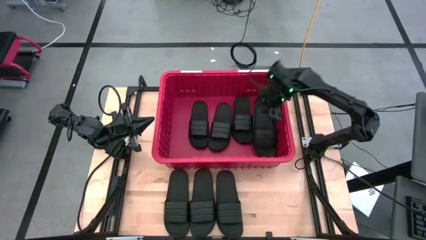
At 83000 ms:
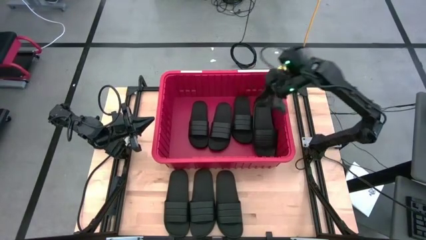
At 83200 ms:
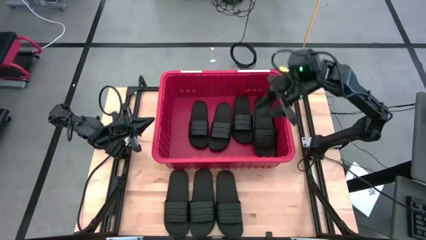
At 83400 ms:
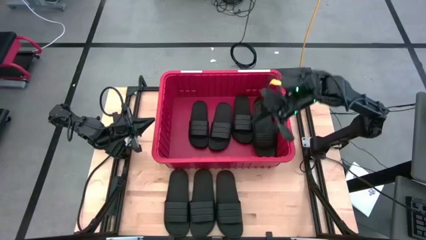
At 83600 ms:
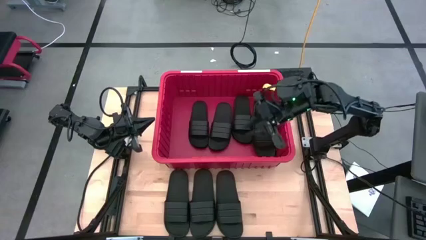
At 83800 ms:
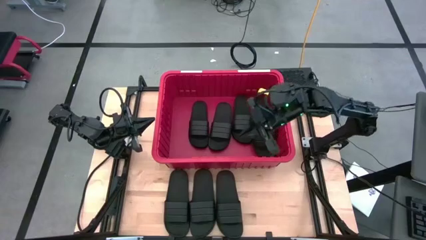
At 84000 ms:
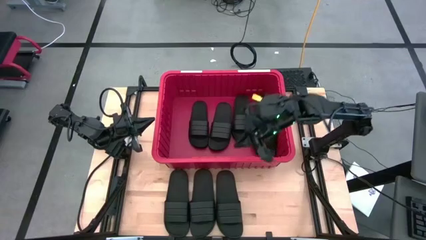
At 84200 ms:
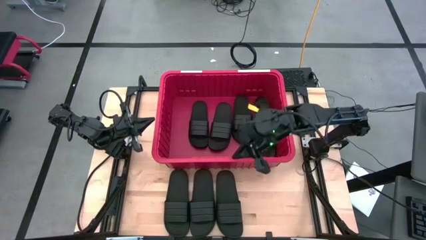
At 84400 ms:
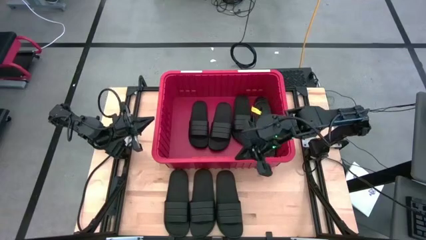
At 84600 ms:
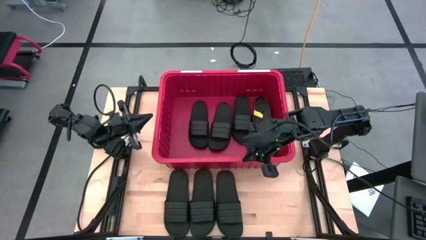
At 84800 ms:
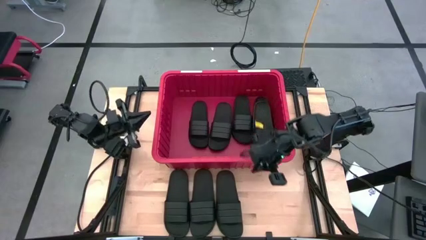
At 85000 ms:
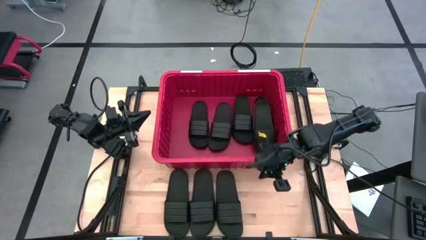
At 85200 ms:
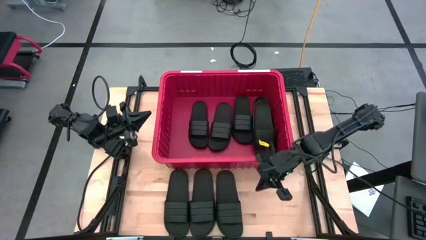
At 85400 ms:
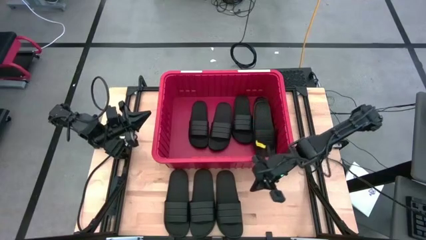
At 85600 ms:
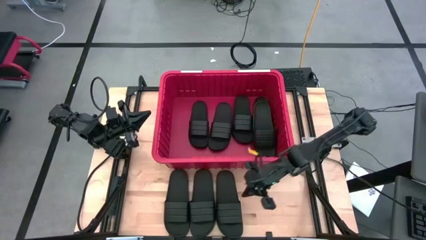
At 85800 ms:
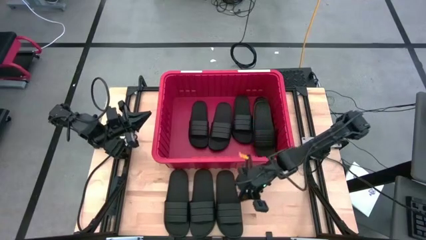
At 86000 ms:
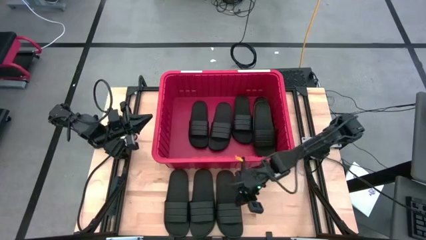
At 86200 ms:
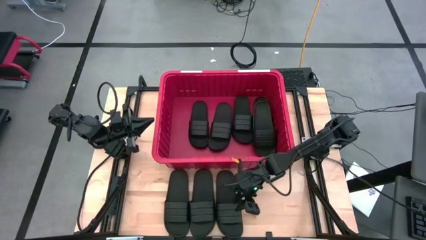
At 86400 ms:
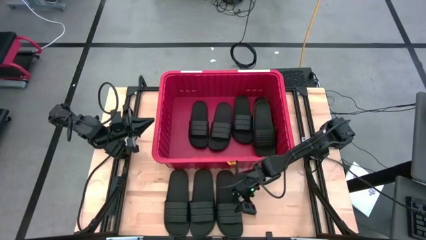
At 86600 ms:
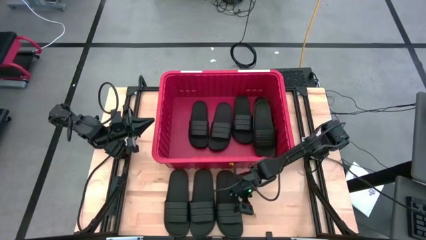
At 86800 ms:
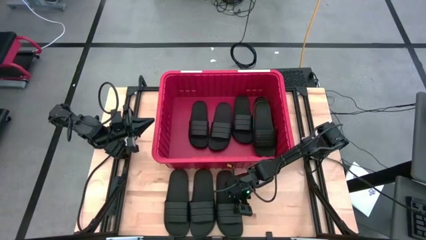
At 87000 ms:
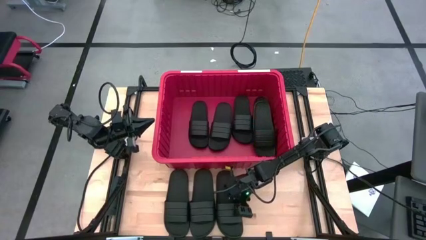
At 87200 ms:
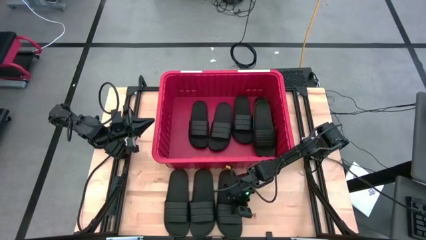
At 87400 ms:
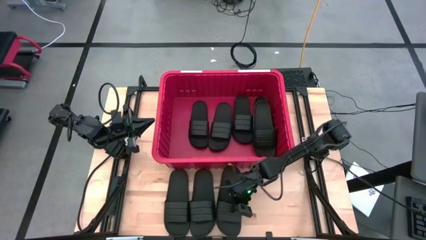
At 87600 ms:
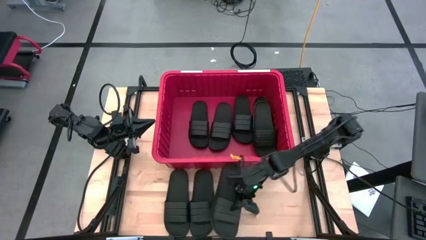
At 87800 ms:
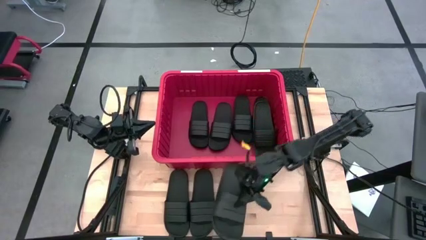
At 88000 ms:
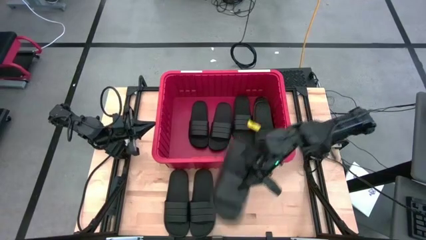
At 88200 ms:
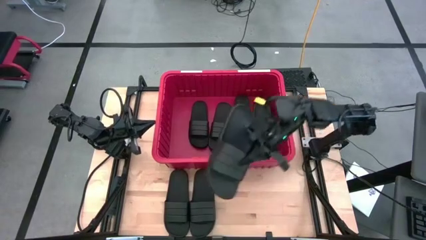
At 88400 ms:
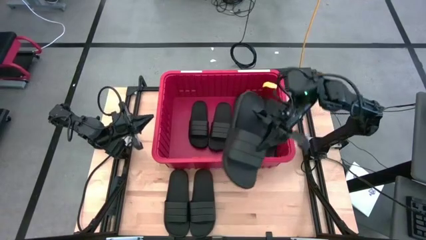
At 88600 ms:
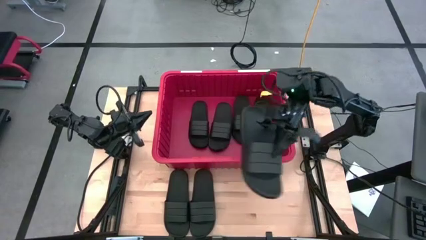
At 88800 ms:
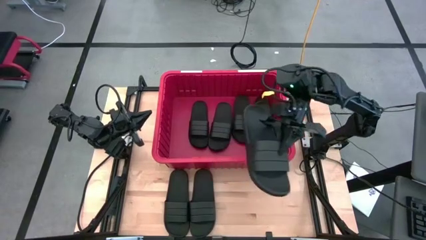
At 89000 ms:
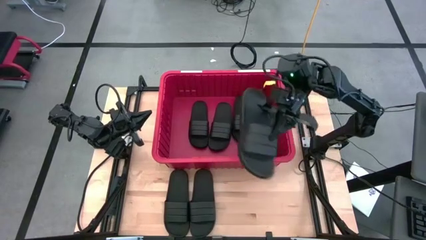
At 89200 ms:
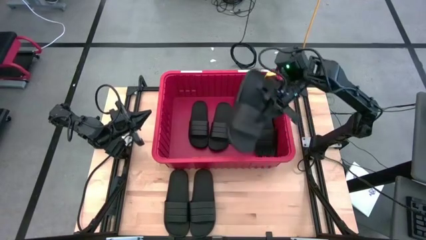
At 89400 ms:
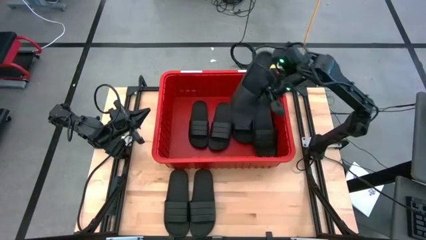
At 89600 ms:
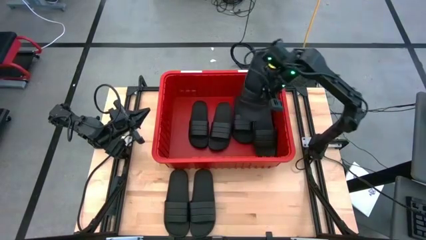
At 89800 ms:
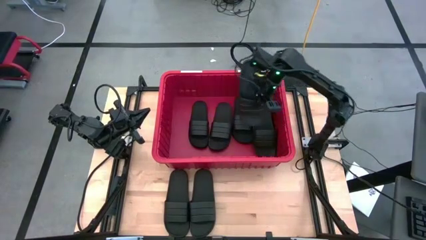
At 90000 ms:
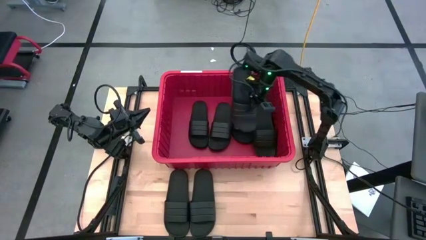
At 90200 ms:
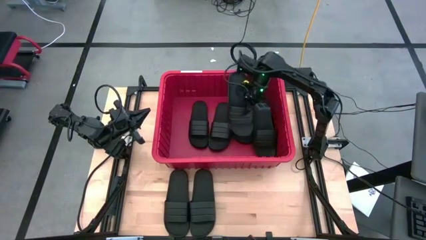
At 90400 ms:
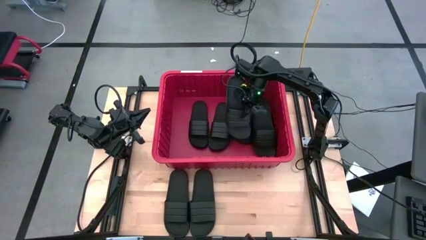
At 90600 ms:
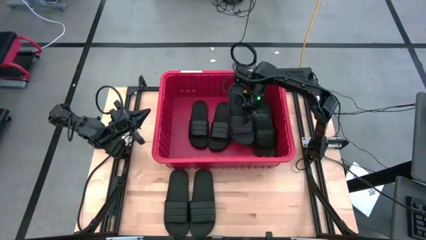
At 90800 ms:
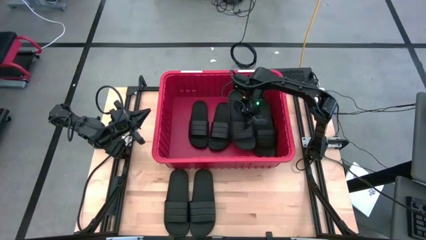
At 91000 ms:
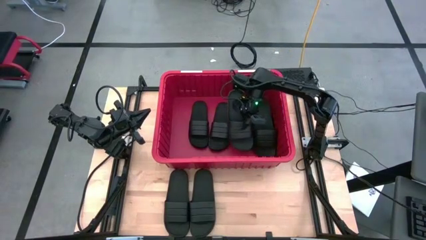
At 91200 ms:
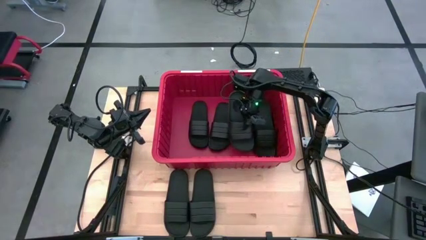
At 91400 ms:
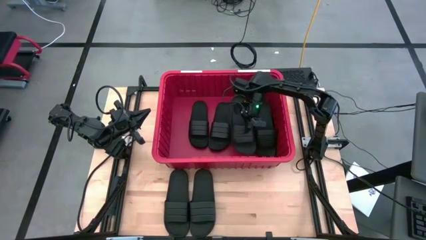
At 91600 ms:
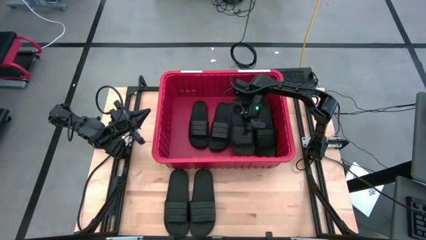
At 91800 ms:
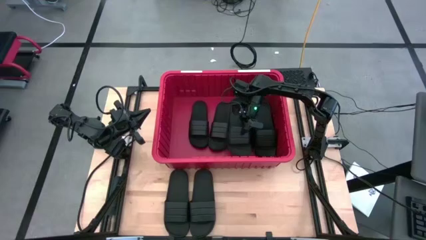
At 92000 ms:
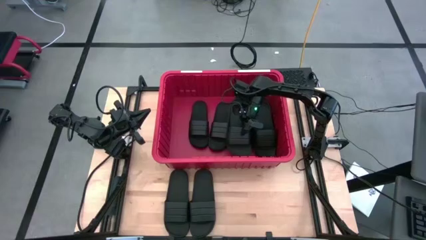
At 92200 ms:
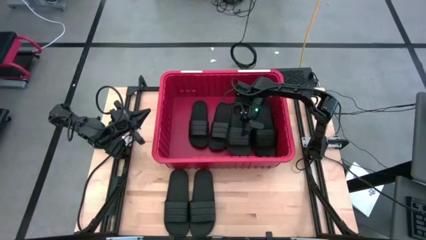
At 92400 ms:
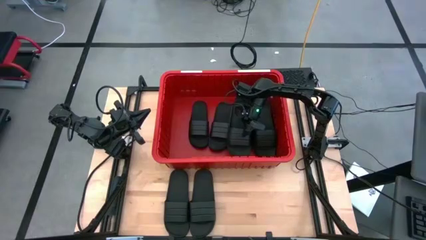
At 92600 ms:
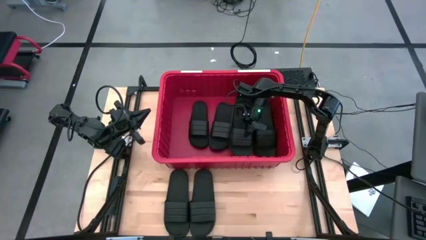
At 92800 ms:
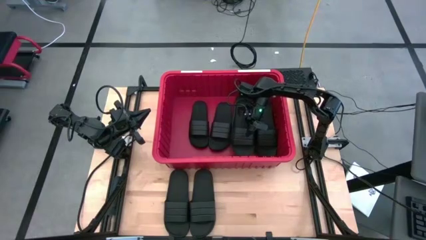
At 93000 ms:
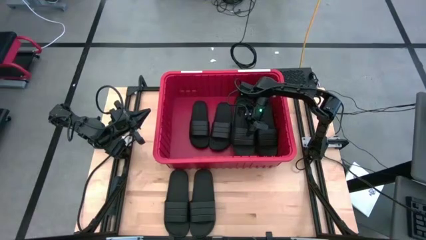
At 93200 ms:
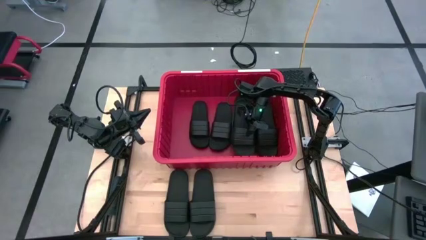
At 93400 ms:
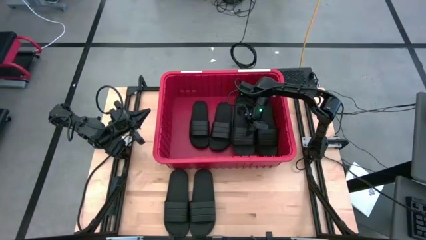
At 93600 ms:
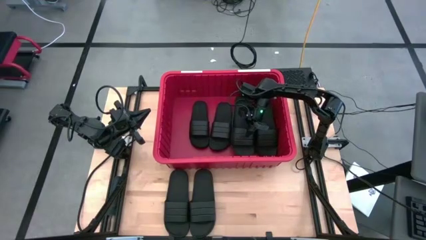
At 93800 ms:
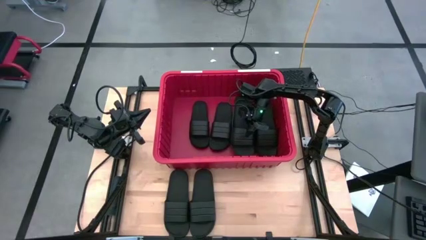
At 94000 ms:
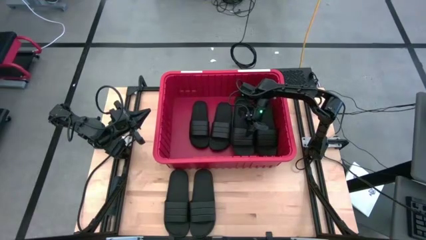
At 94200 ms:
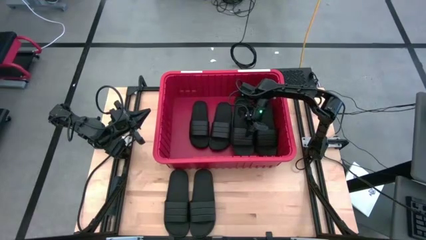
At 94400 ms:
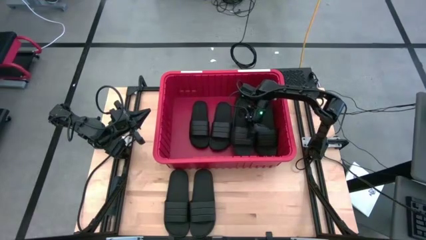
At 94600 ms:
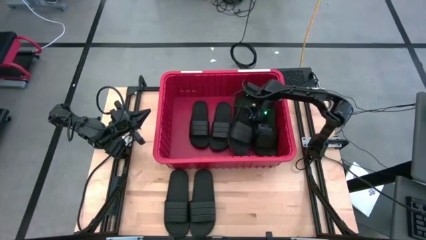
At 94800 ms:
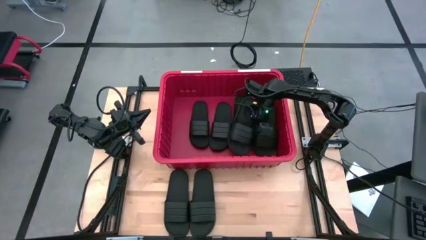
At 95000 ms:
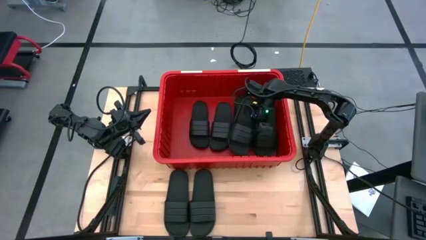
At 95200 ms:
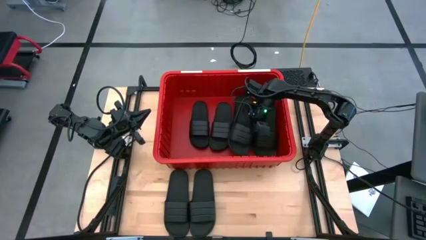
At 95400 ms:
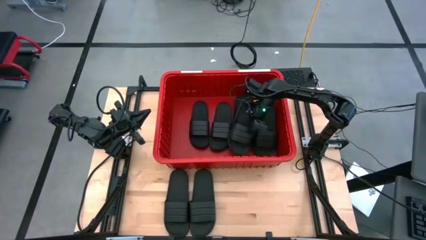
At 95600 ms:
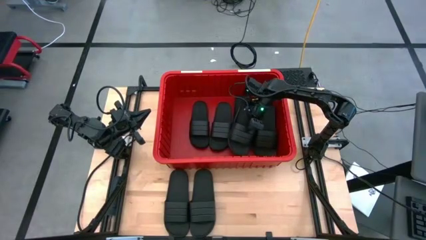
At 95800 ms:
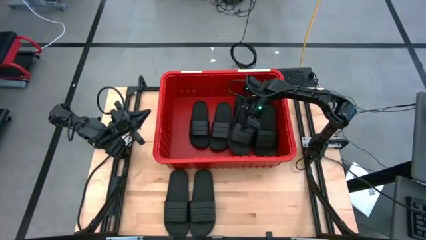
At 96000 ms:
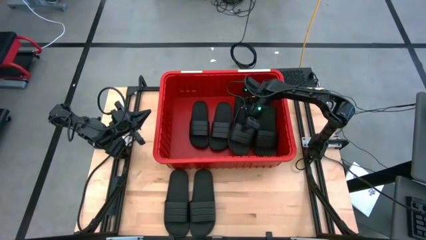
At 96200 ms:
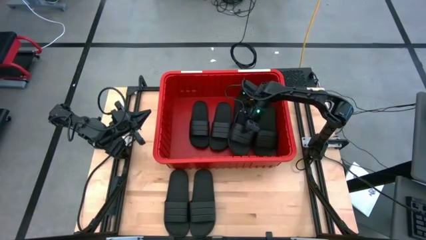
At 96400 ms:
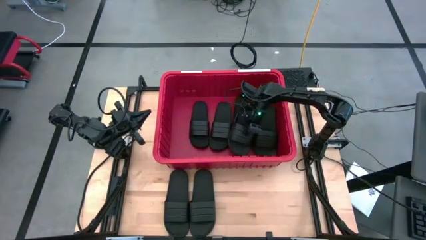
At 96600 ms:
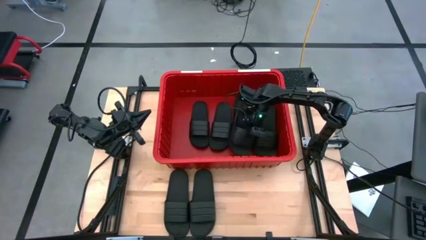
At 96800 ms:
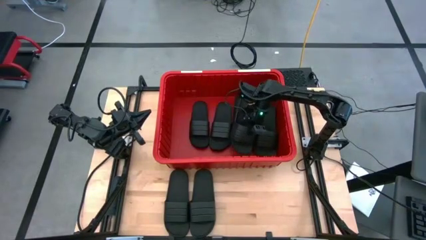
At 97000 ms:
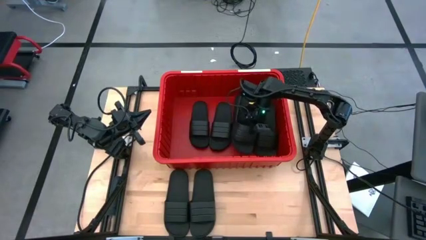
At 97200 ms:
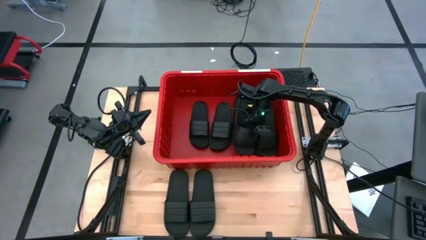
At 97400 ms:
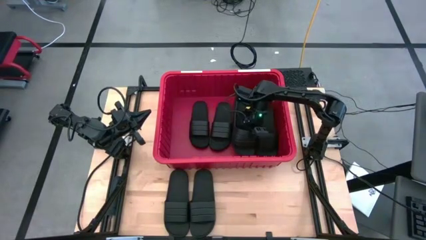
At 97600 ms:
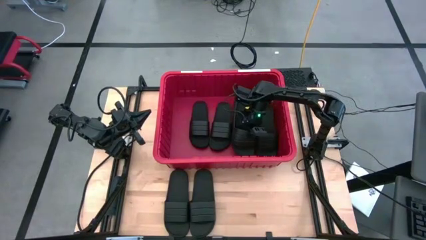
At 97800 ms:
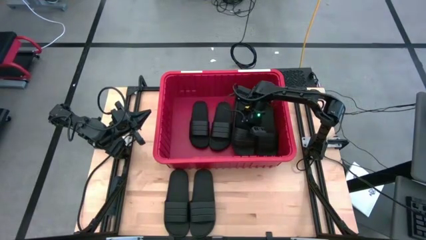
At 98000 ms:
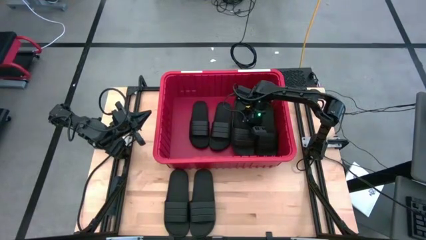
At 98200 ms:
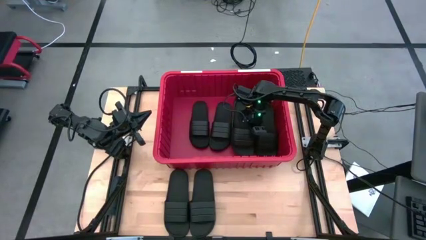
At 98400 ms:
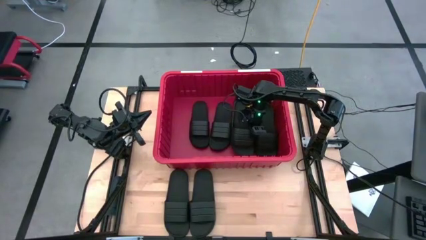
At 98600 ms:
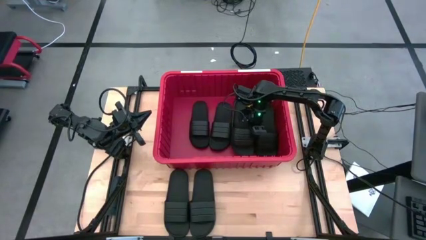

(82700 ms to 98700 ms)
Task: Pick and place slides into bin
Put the black slides into the red bin
